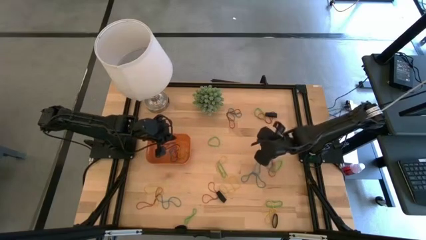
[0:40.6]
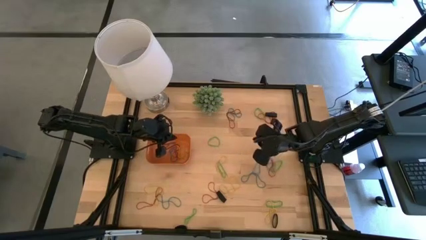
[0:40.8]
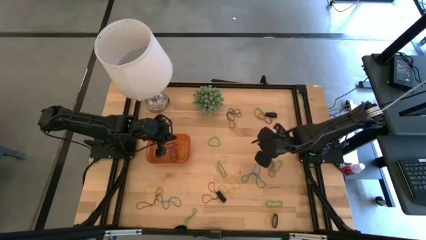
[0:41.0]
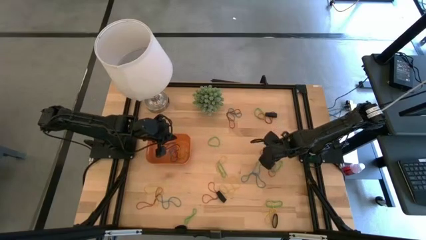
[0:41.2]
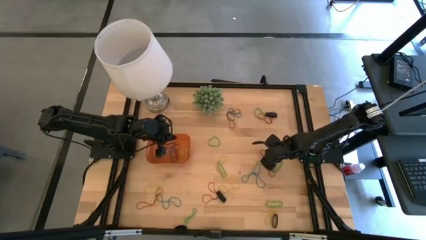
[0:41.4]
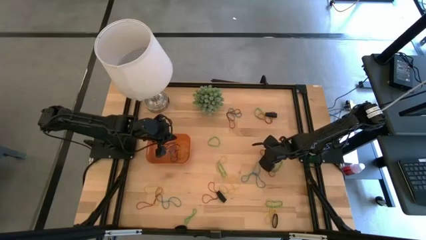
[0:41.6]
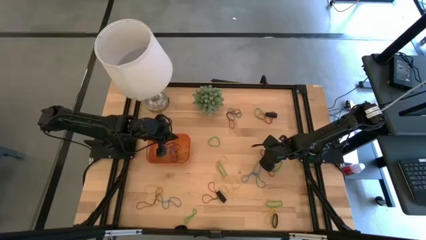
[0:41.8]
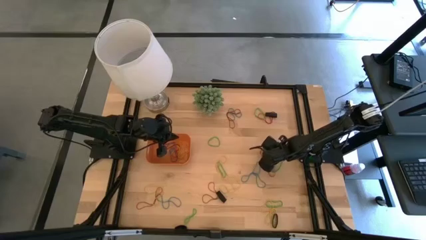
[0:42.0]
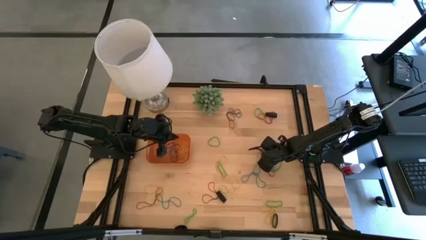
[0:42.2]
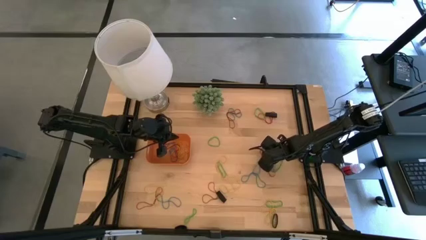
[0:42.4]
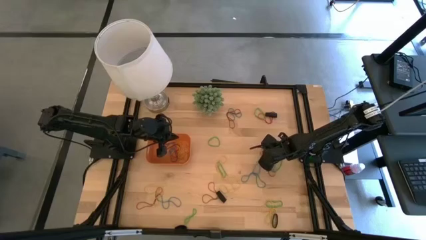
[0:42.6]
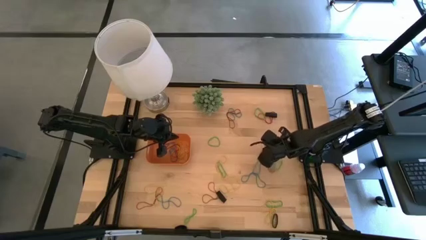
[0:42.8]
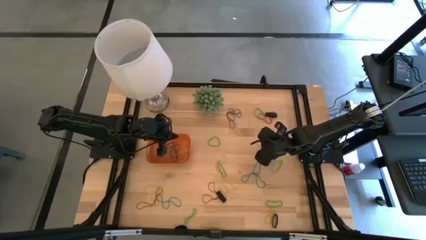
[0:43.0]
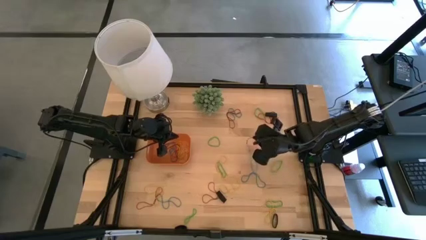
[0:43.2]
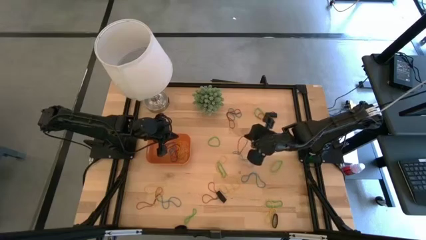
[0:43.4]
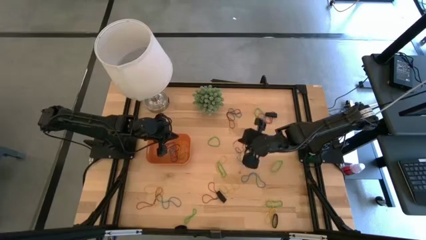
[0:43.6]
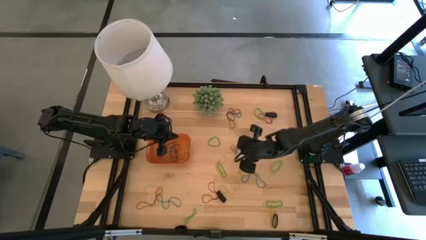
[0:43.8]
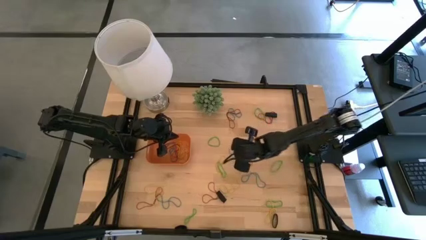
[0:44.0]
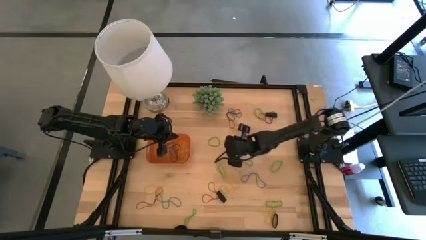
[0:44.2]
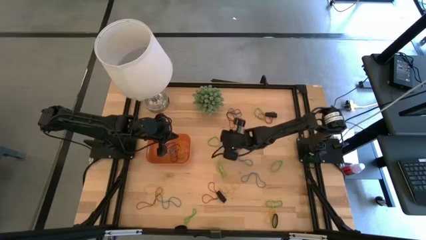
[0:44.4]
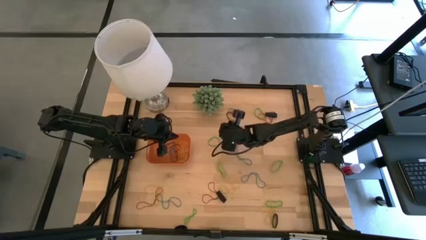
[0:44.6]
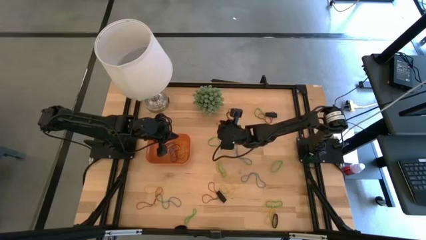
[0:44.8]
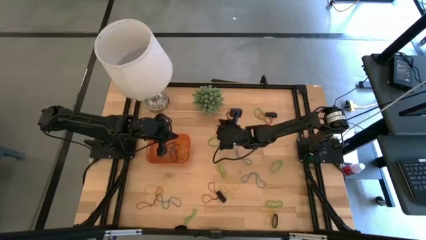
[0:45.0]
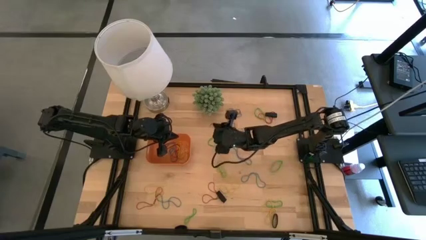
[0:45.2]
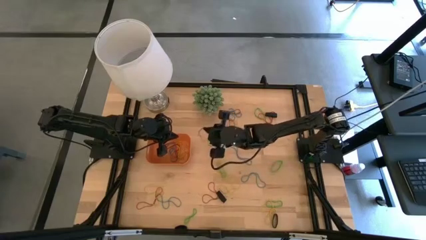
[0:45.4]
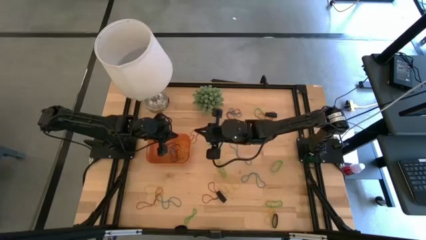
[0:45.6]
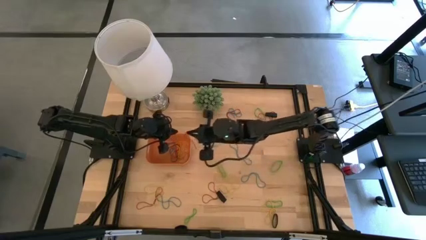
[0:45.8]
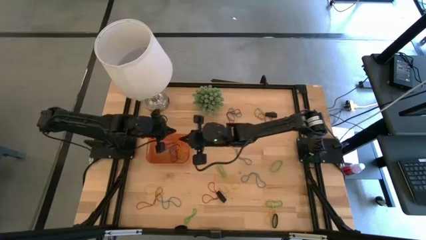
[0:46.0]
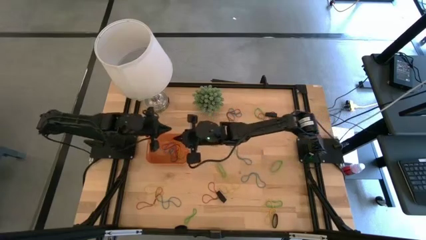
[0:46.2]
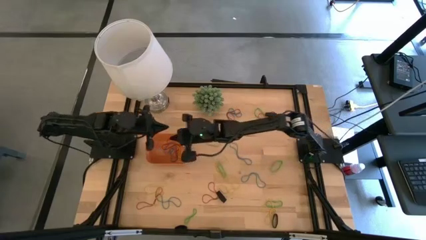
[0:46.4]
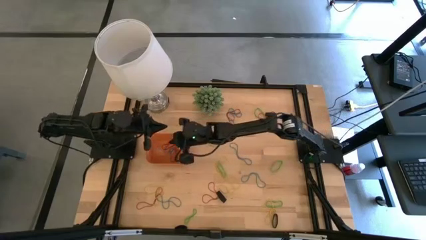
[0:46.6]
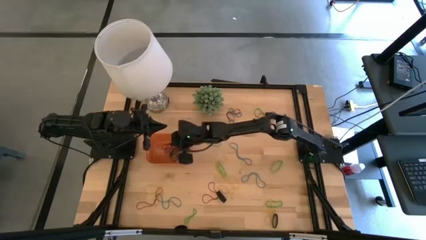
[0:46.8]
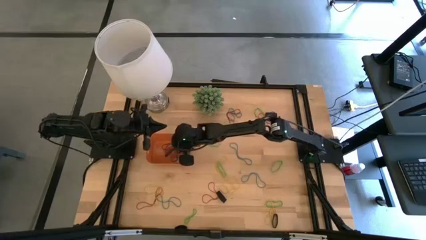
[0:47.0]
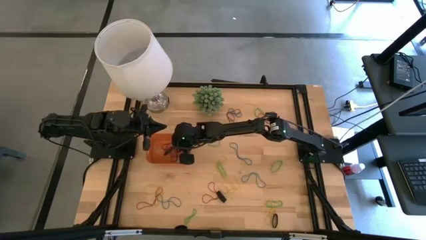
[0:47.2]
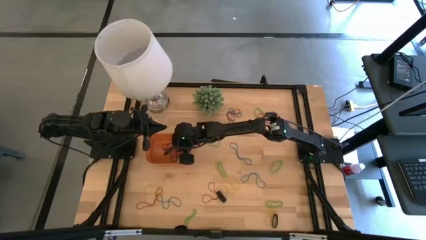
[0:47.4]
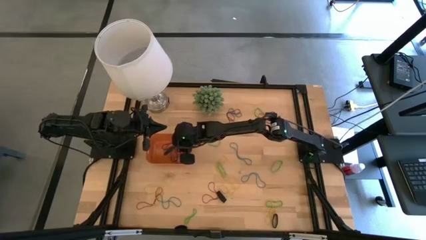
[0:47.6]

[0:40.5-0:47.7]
Task: Pick and place rubber bands into bin
Put the red rubber band into the orange bin

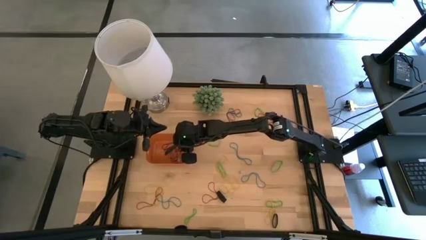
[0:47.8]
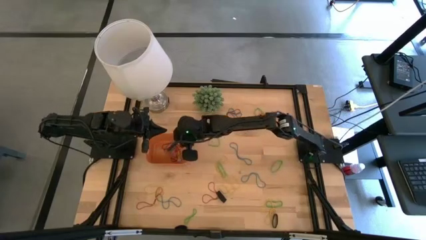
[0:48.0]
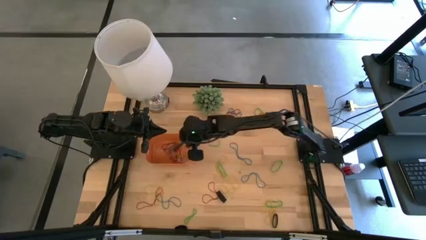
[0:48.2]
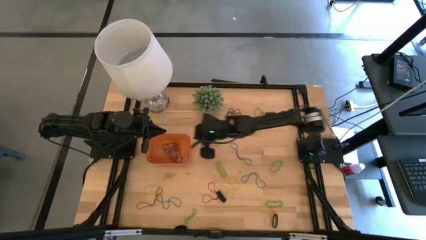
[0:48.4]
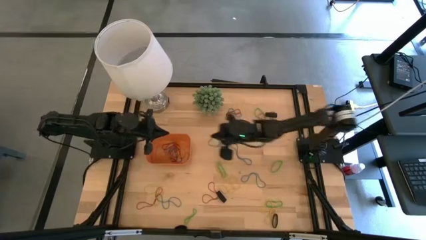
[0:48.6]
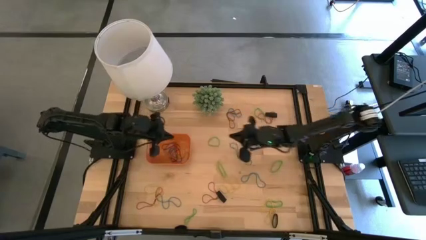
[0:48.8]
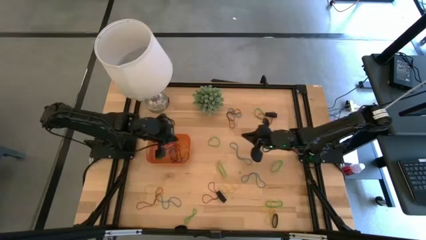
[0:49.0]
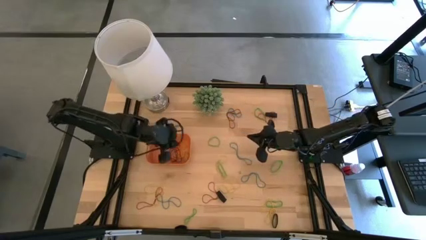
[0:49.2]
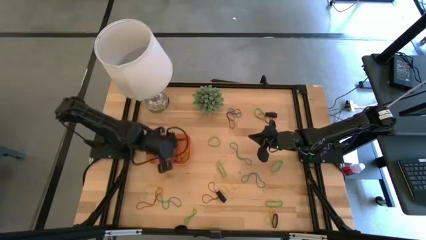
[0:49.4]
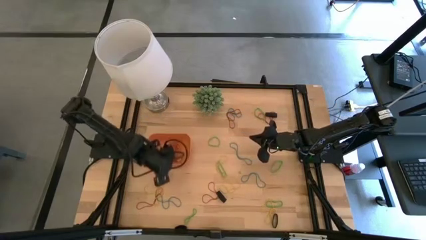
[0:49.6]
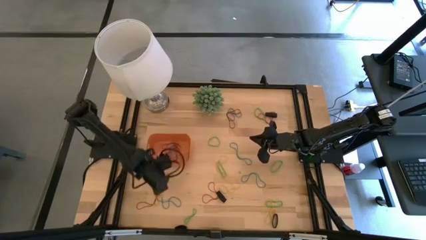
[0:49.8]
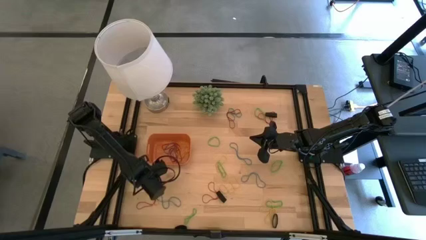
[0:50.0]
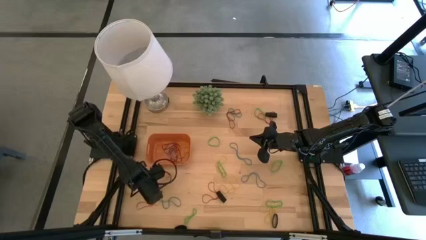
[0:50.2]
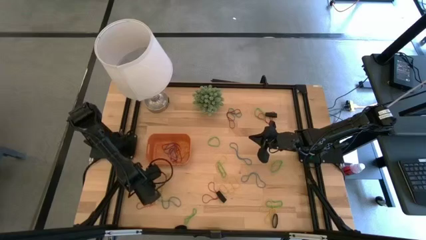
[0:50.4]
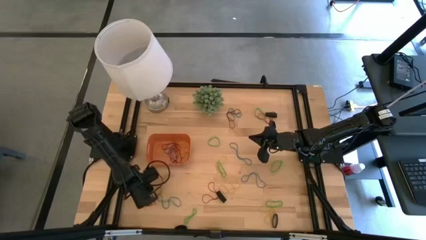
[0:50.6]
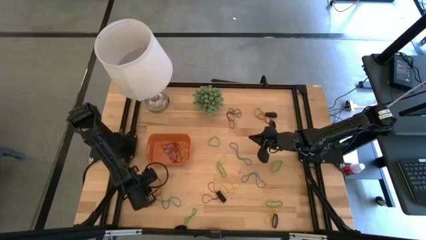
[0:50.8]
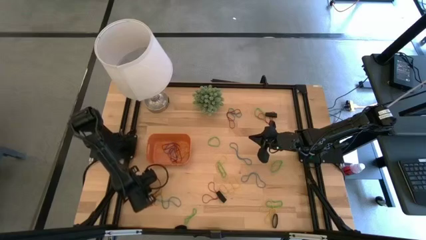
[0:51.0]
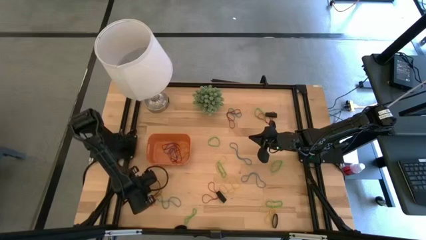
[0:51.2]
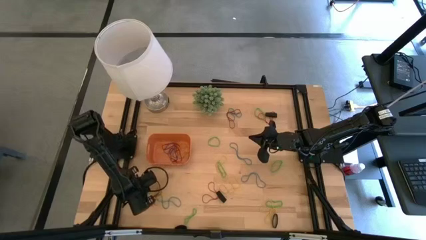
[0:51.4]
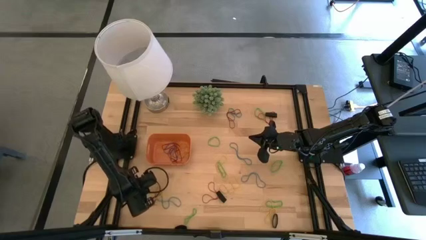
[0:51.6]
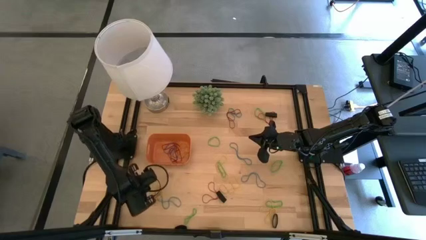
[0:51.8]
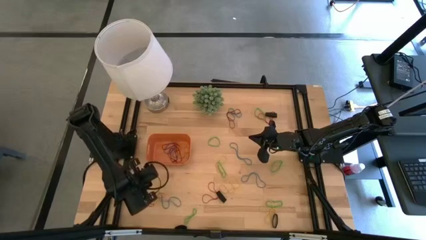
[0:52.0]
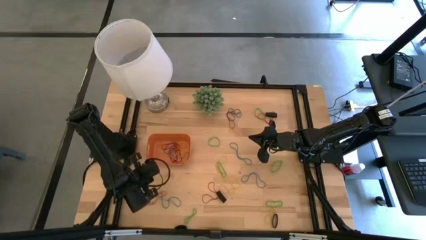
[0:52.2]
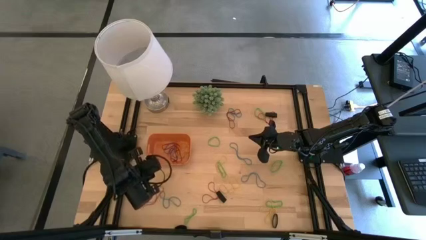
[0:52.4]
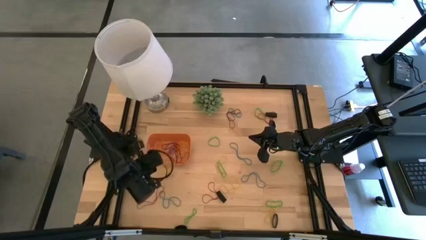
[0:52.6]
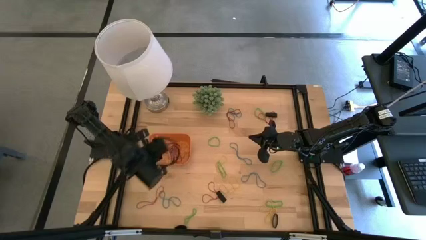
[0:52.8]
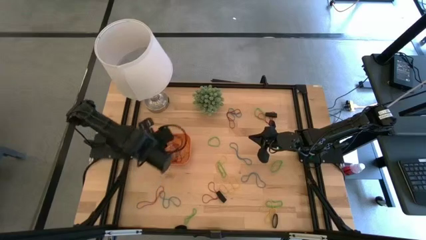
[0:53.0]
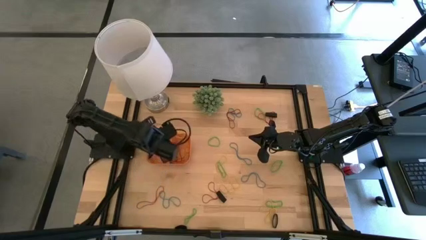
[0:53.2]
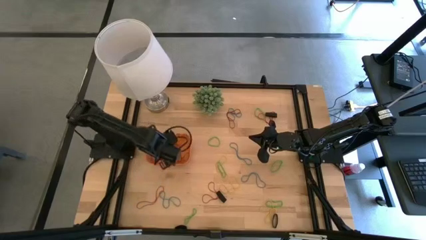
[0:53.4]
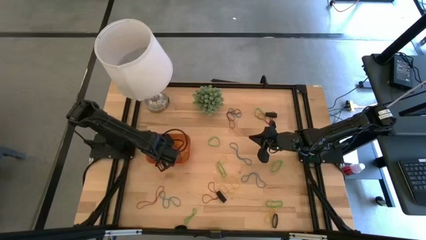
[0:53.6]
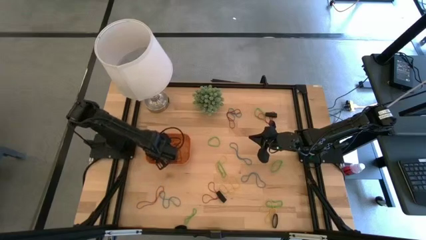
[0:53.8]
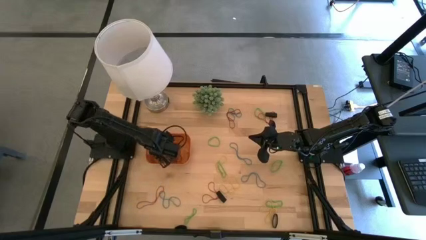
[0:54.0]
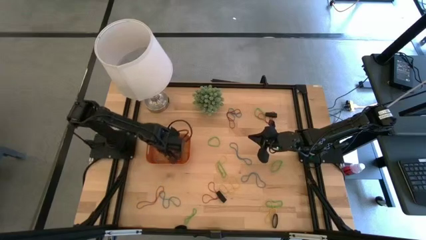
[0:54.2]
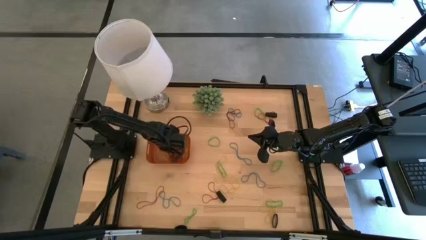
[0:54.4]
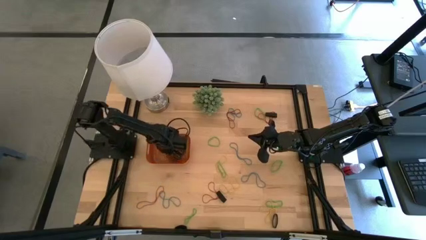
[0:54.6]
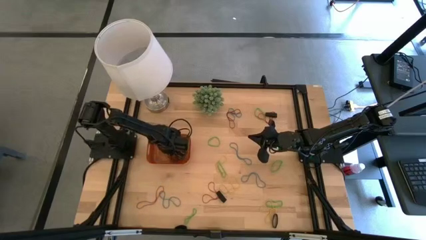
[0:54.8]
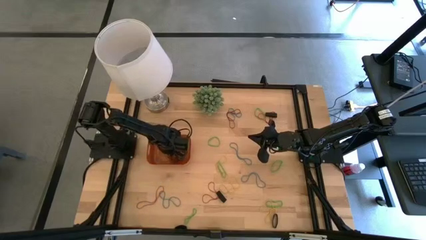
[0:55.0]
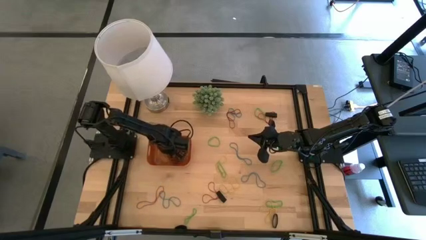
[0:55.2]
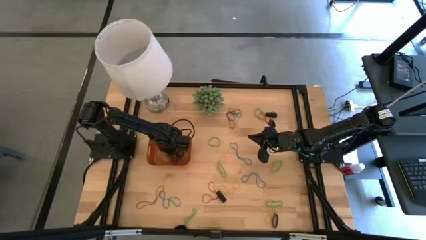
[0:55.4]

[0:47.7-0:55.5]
Put the yellow rubber band into the orange bin

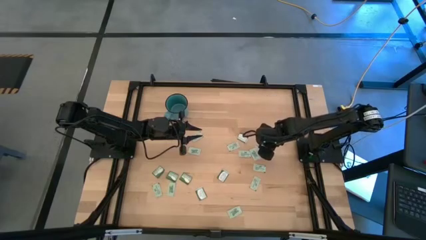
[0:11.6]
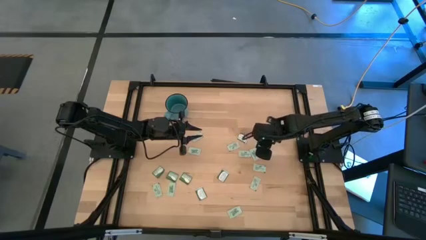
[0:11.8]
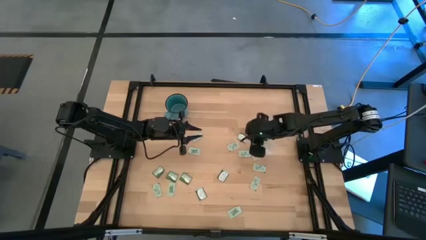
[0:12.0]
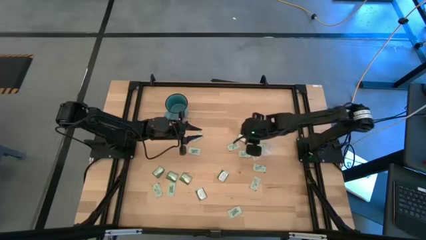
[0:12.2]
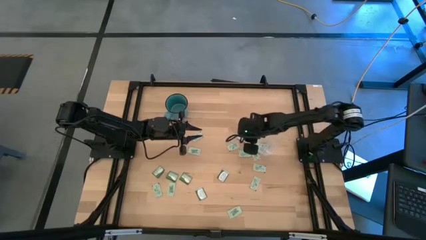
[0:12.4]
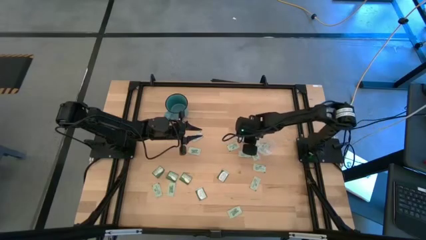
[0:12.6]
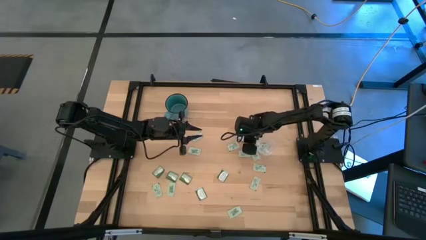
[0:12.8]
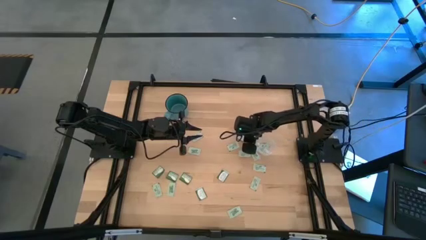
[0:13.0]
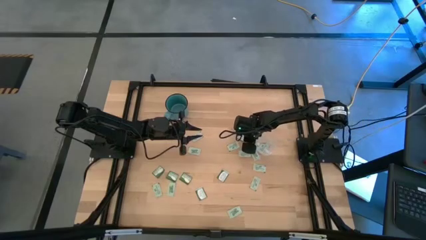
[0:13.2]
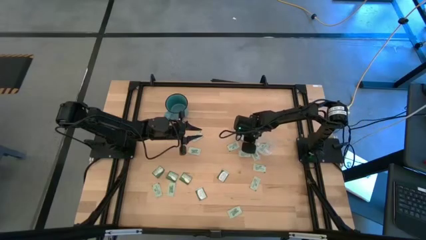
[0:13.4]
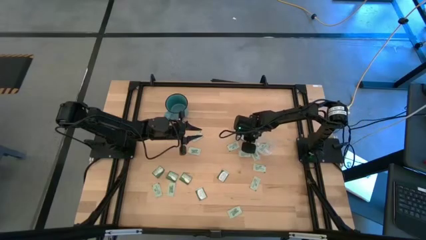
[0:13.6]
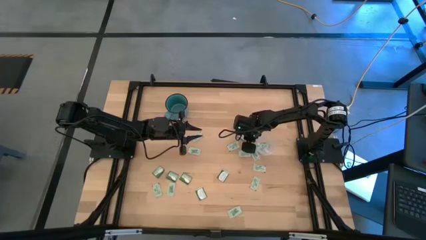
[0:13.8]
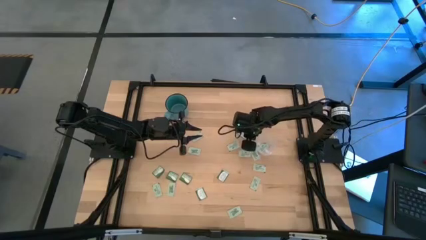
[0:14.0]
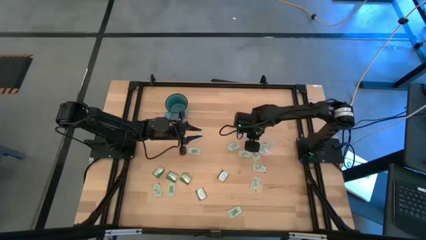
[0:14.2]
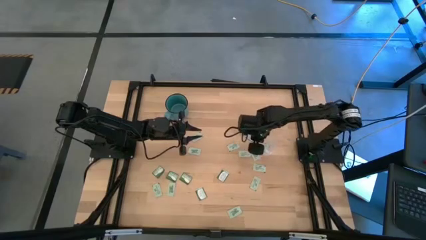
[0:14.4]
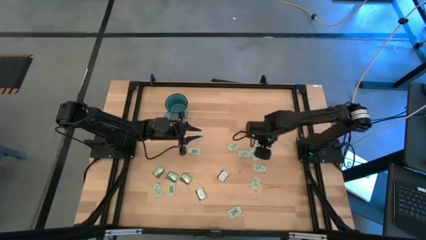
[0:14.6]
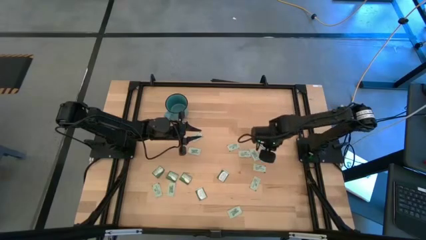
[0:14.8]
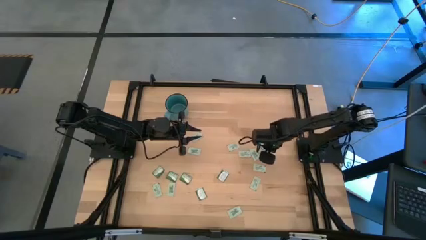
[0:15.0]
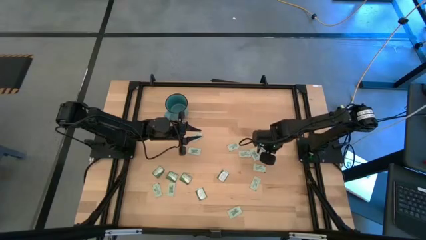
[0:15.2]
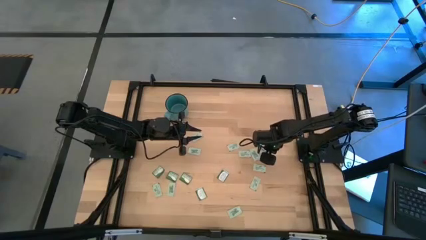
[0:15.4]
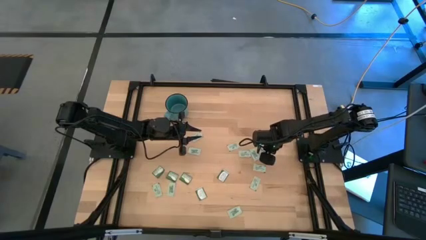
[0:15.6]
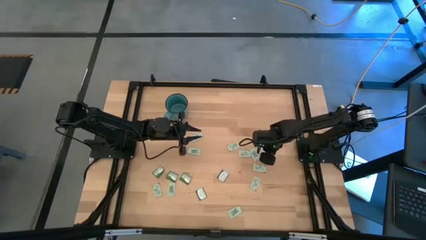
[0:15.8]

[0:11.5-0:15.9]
Task: Pick and place Stevia / Truvia into bins
Put the truvia packet into the transparent bin
